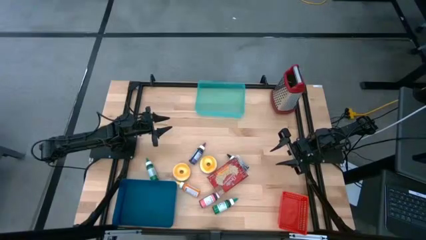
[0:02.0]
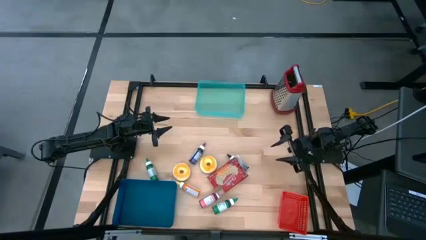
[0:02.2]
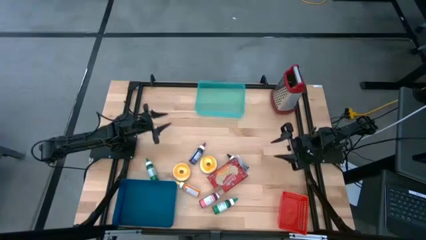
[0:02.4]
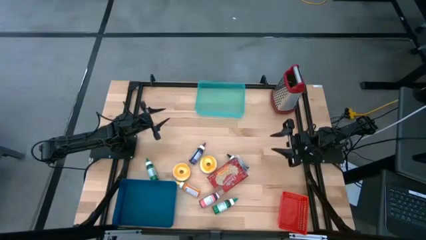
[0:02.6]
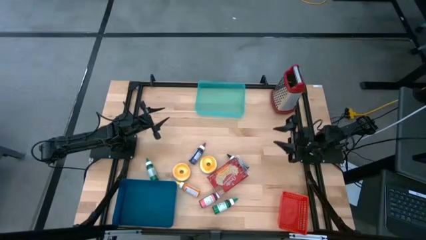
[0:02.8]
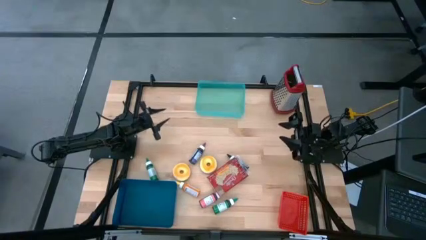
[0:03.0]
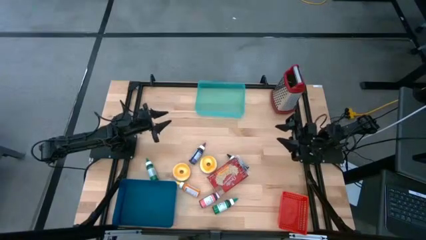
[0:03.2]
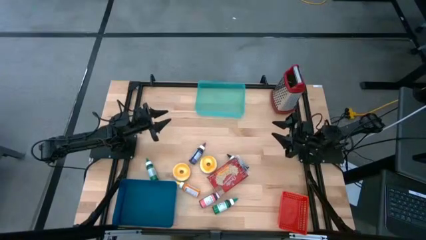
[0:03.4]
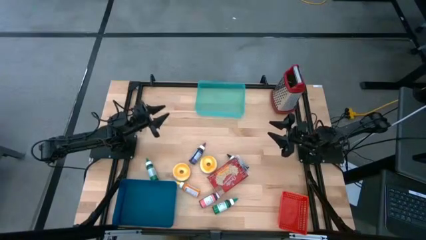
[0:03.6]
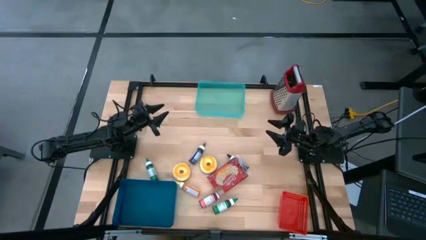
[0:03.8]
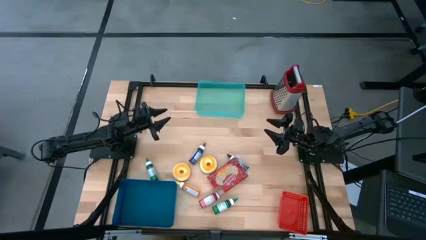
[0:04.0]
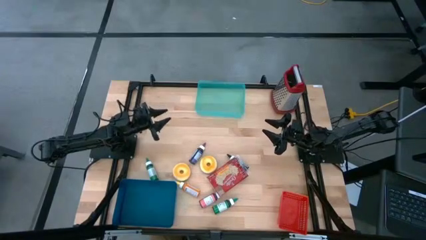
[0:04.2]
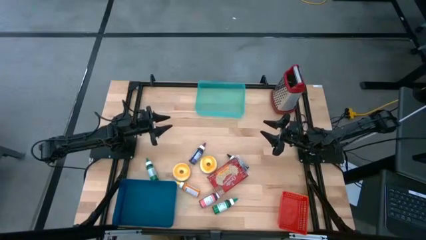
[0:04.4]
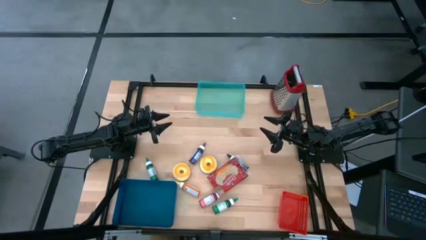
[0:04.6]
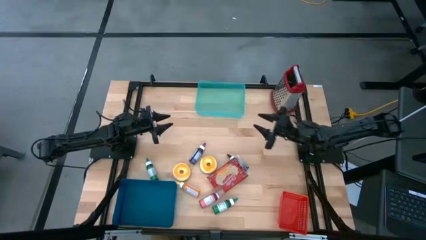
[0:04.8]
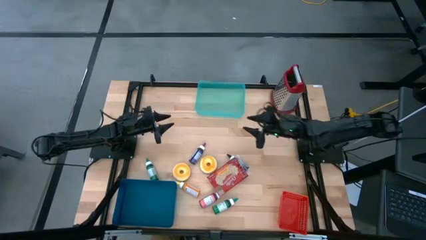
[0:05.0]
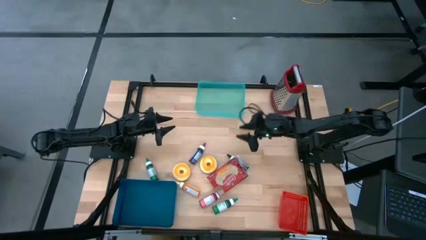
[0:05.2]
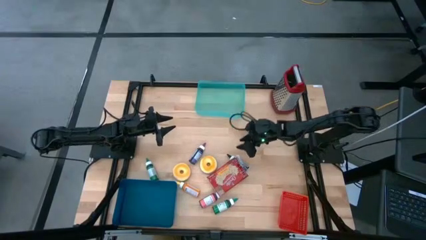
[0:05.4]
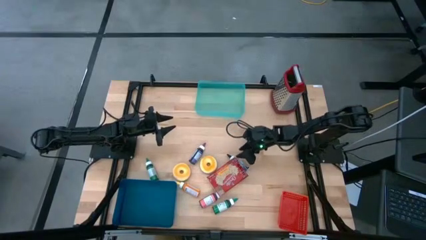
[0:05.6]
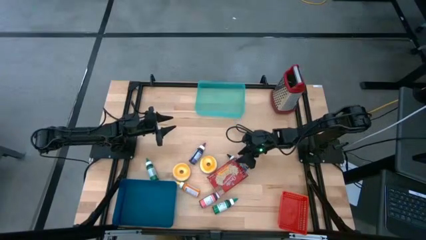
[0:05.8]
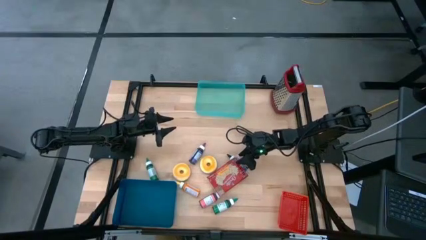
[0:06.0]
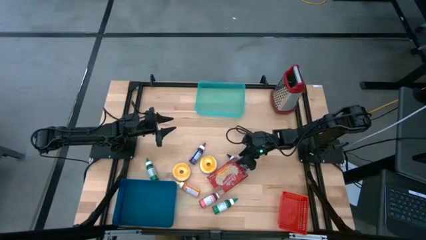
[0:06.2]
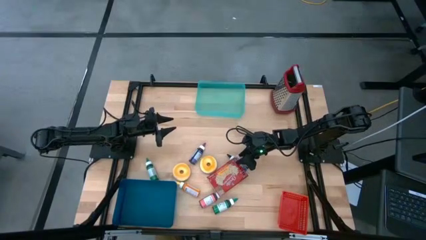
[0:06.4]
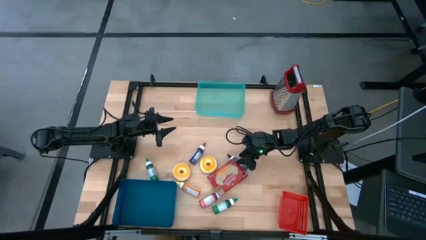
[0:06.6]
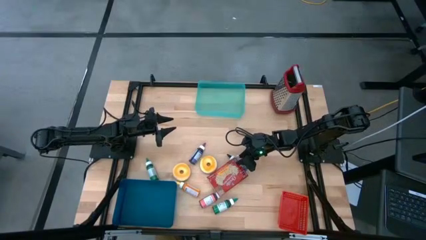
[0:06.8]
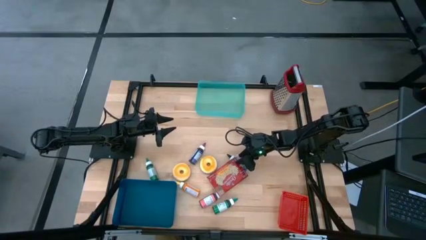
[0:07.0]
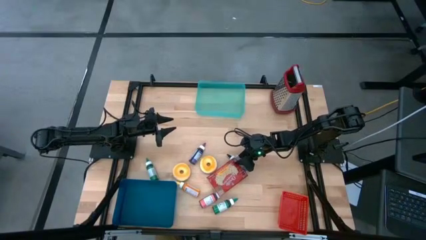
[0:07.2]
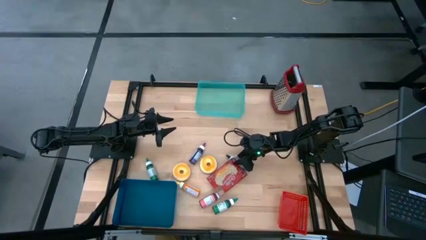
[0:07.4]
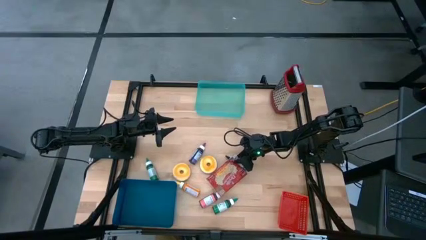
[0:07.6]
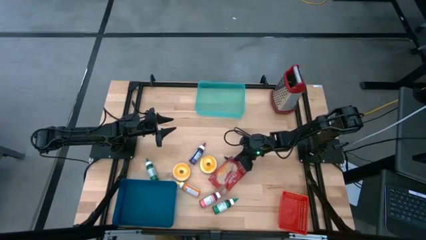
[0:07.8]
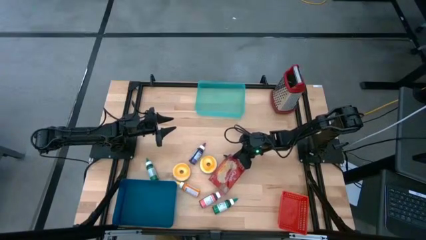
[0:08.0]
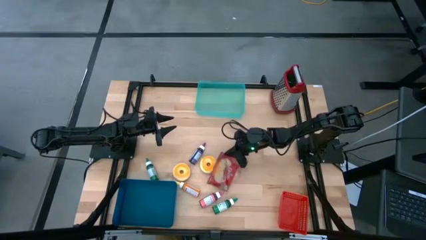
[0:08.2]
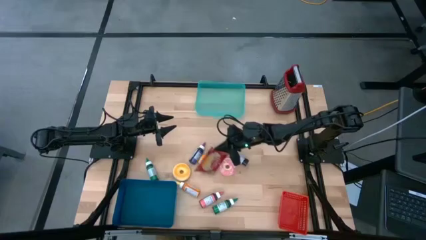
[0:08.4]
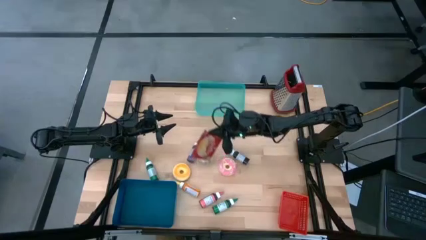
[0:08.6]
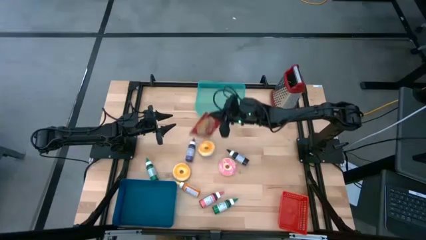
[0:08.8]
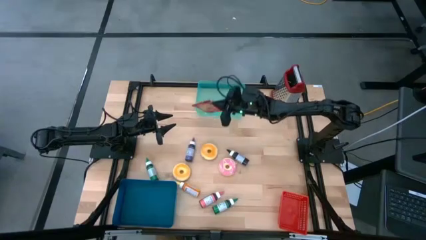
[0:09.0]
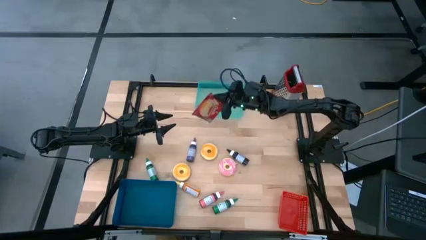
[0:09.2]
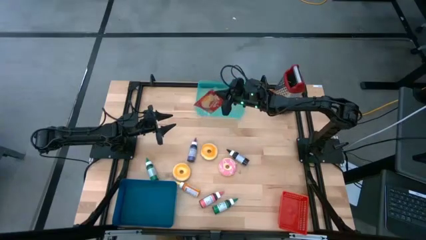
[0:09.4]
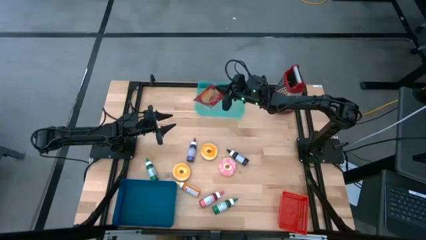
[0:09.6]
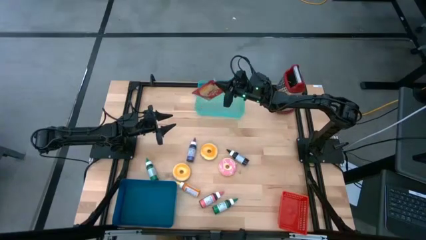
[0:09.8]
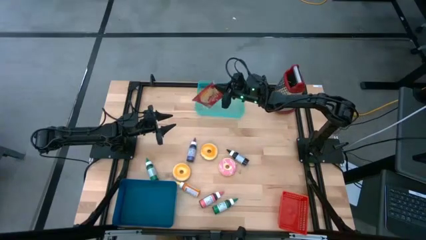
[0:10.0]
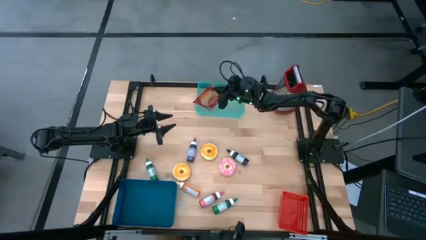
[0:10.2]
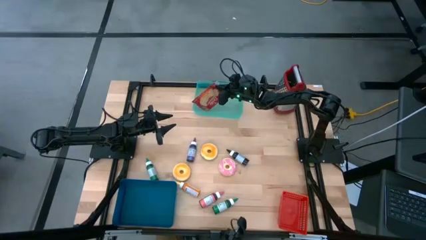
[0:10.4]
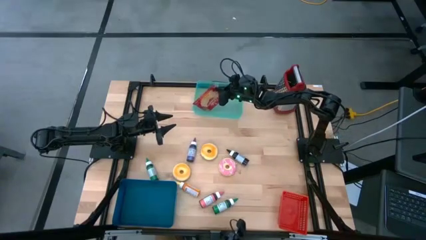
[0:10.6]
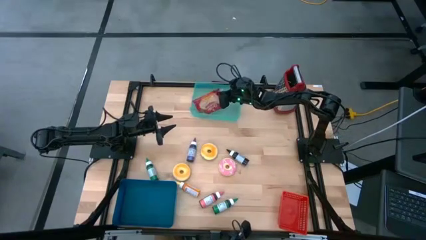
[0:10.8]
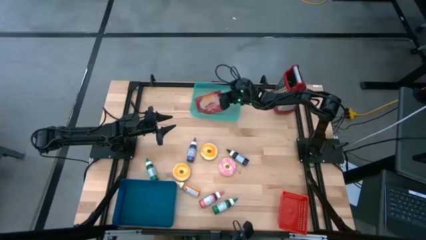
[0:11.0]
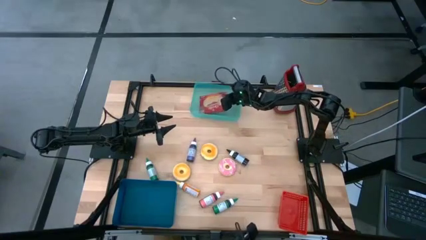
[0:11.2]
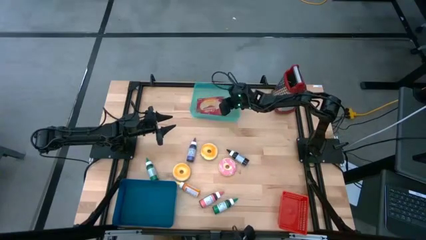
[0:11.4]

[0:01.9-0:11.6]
Put the red popcorn bag into the blue bin
